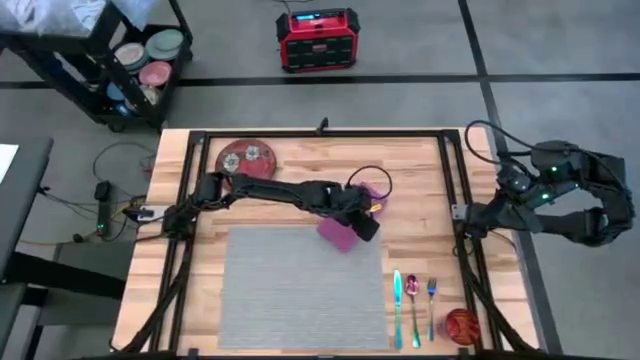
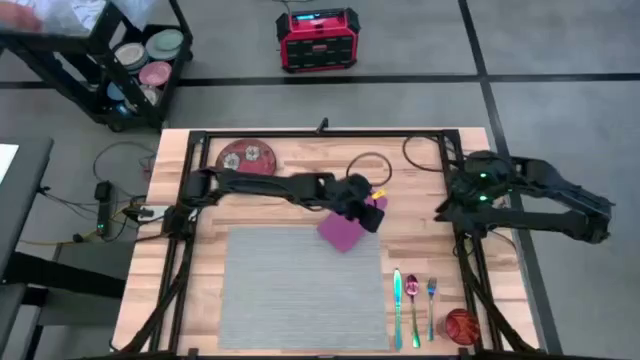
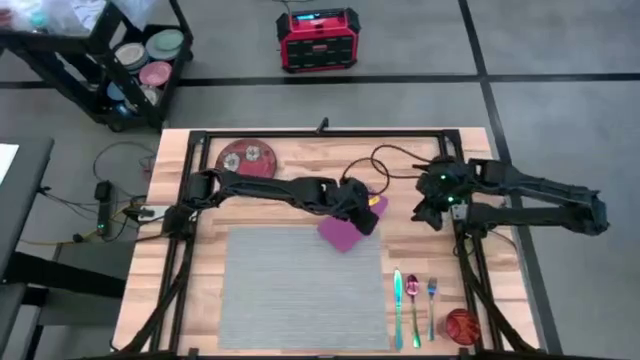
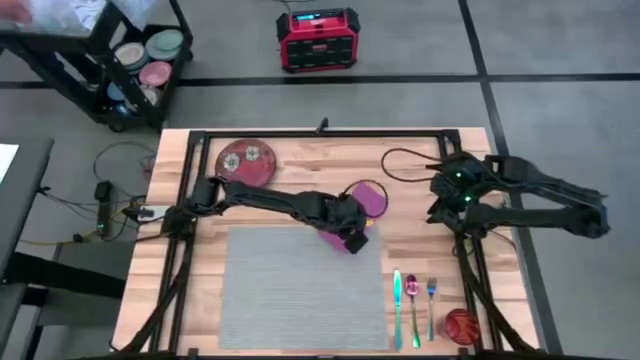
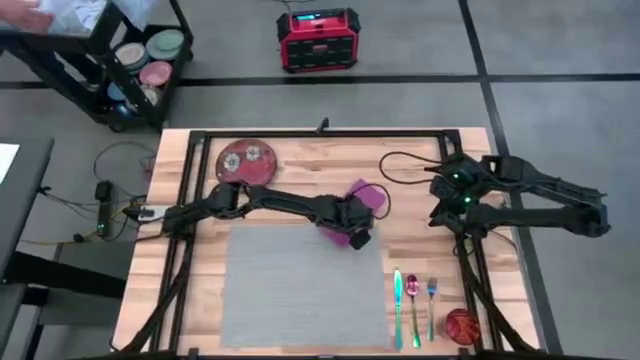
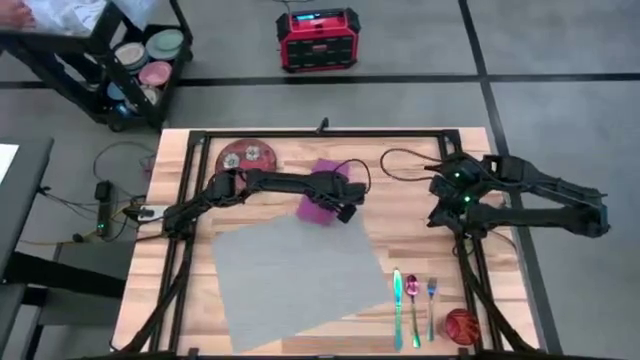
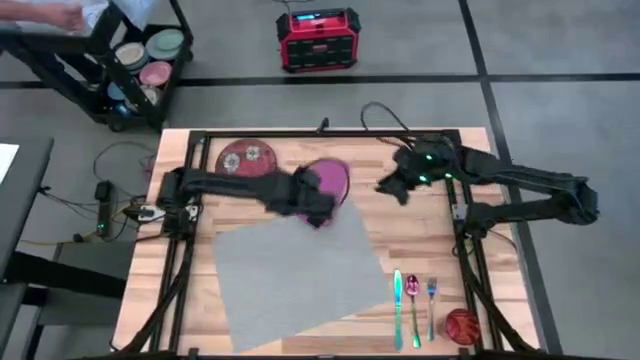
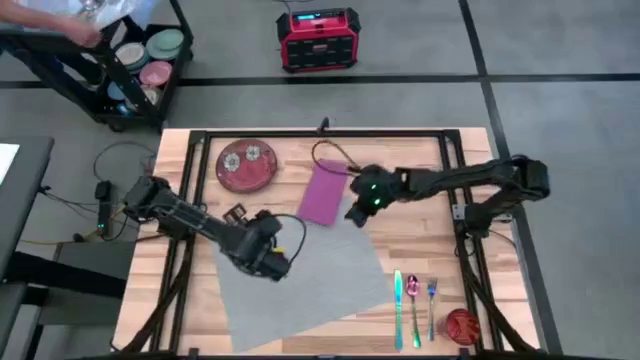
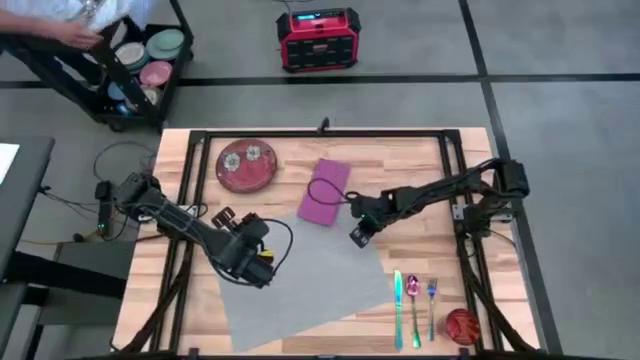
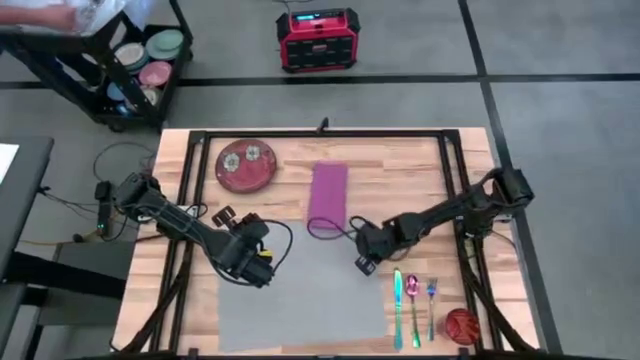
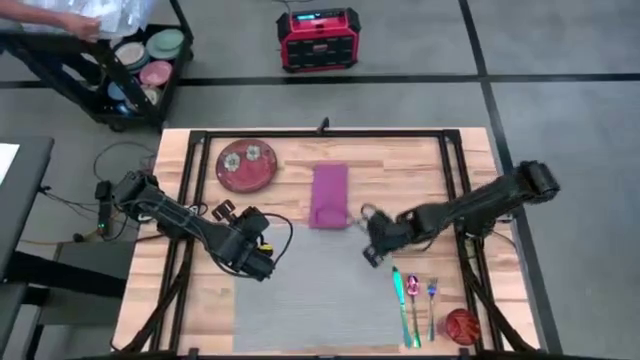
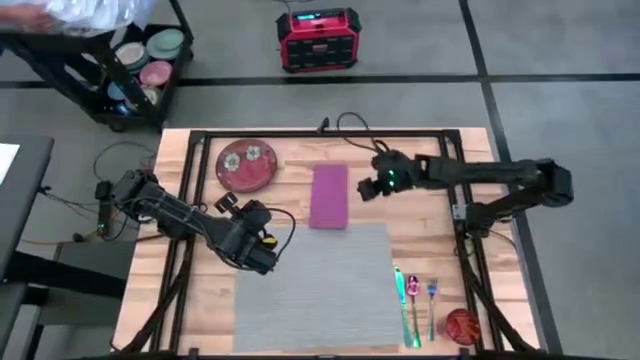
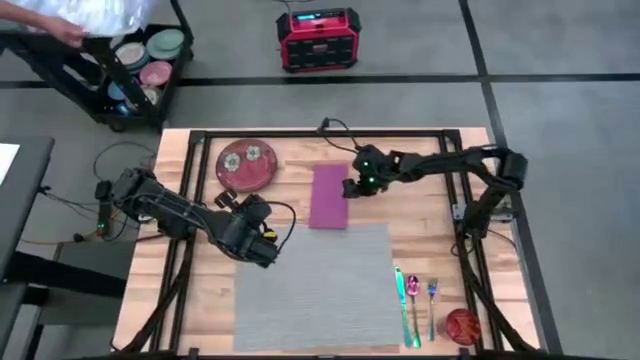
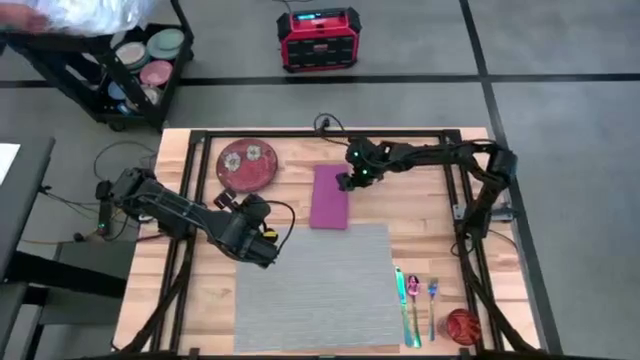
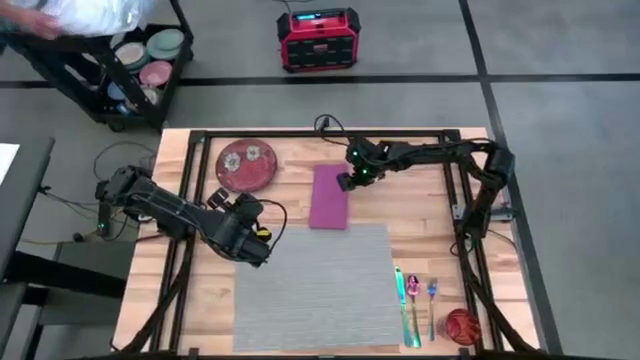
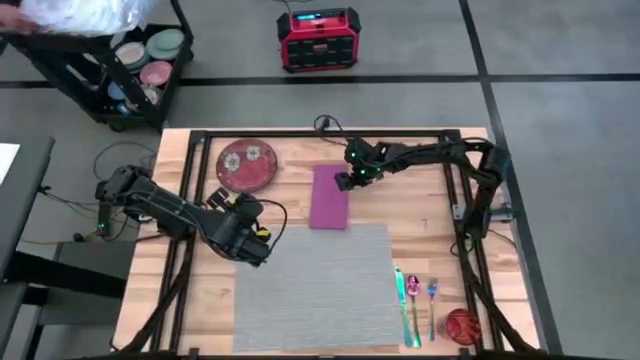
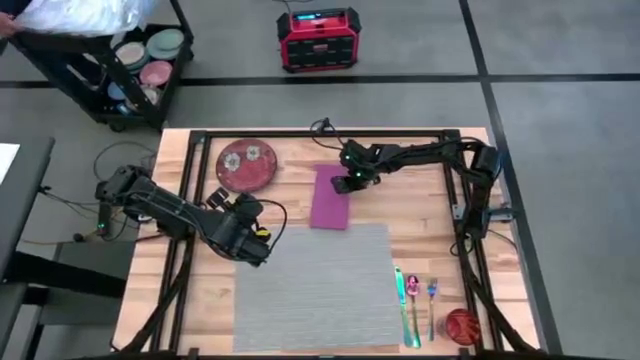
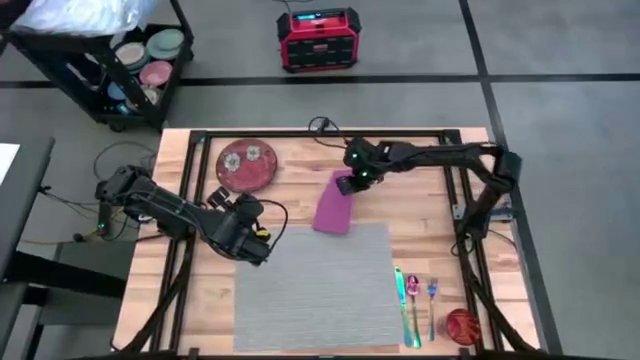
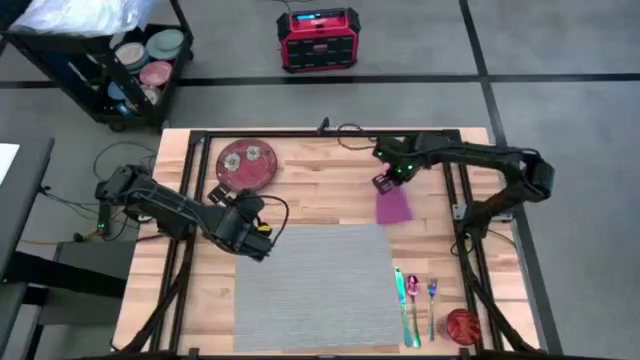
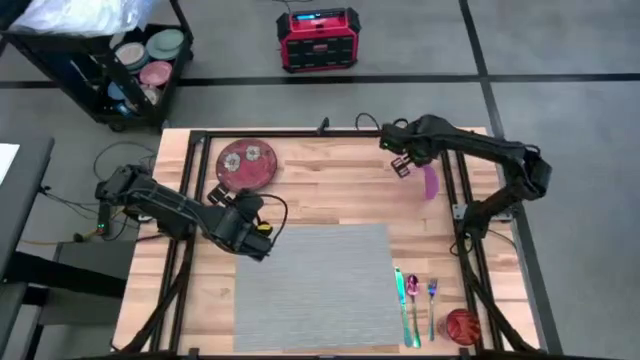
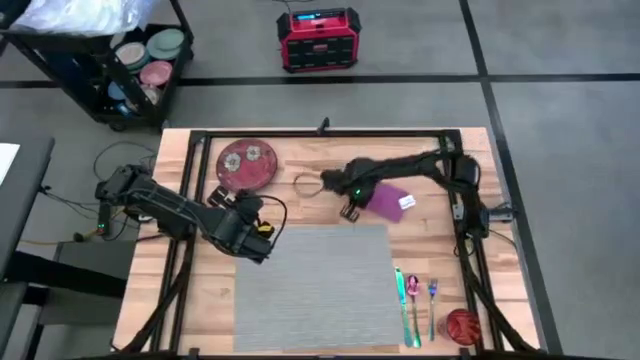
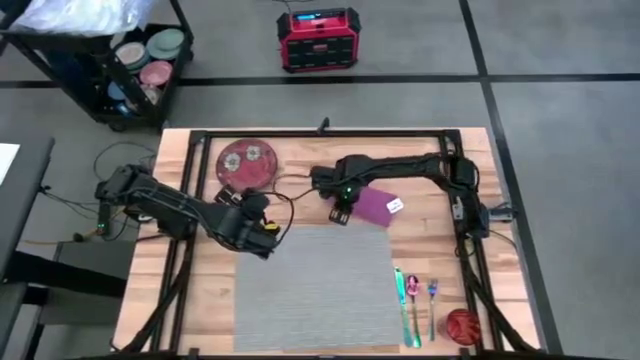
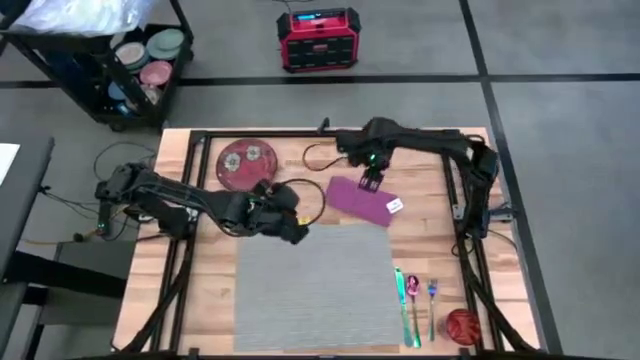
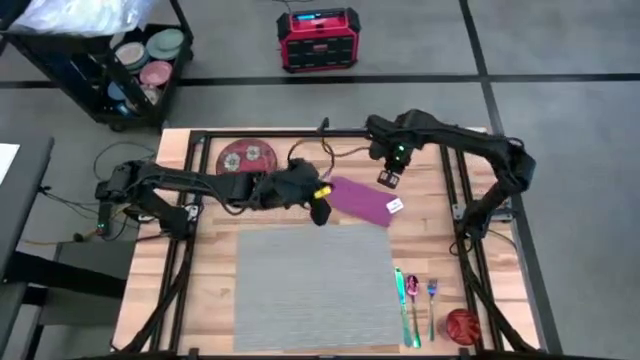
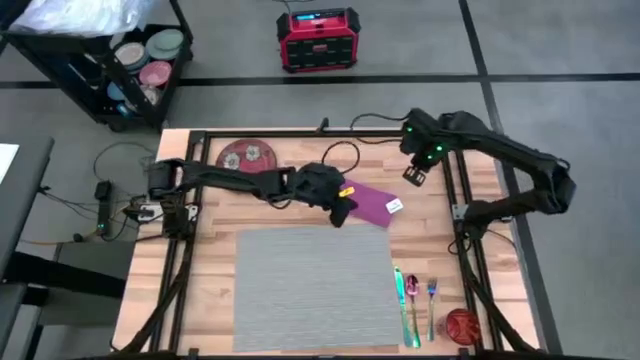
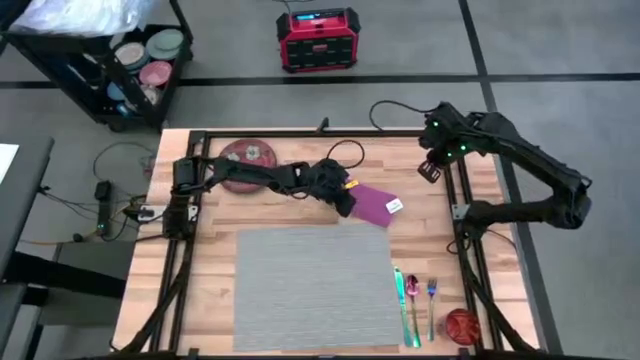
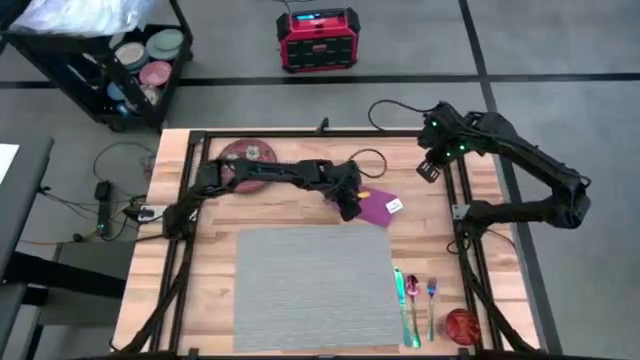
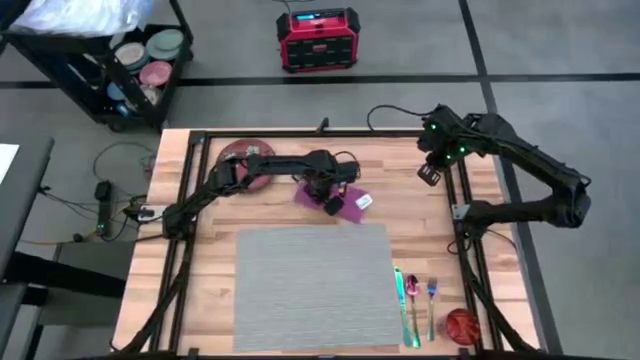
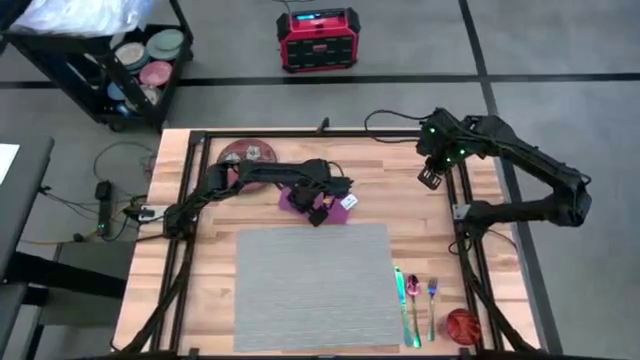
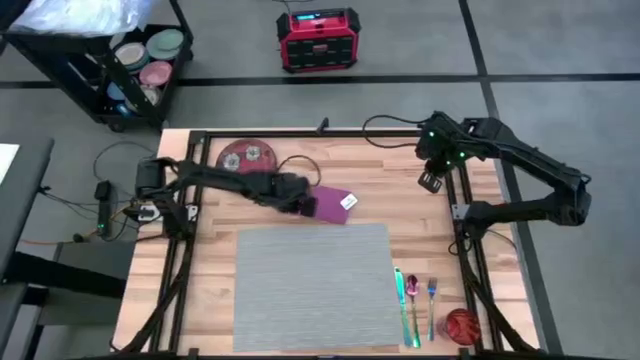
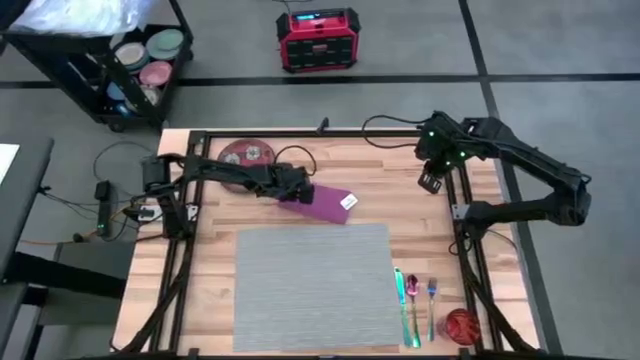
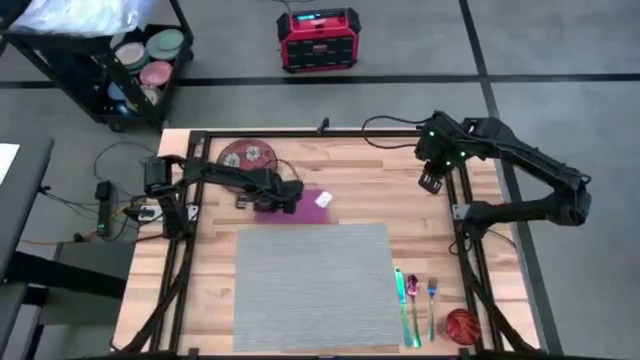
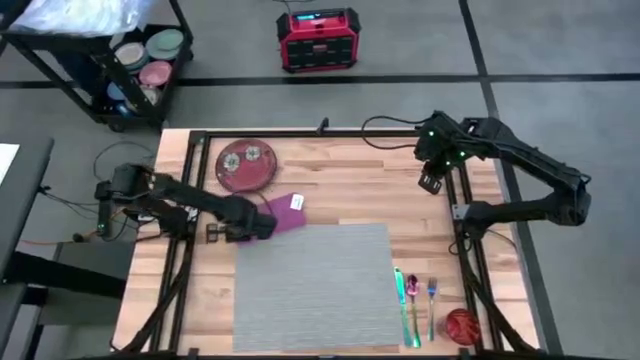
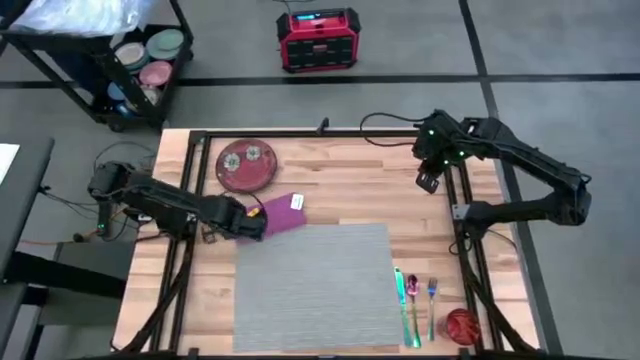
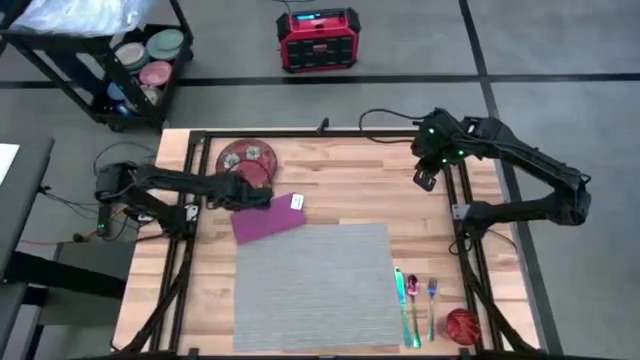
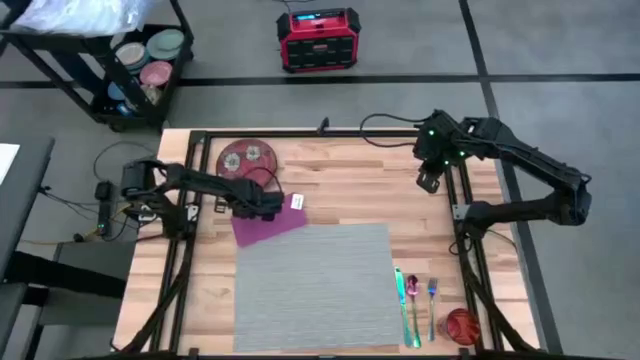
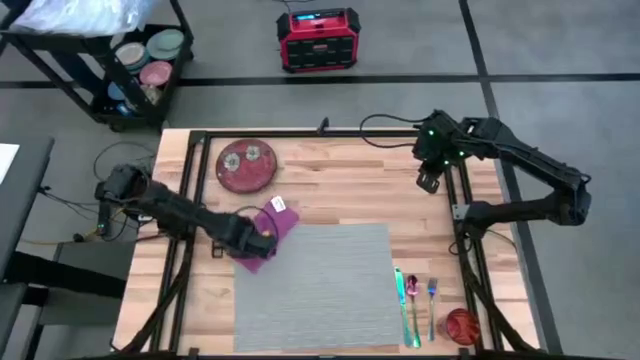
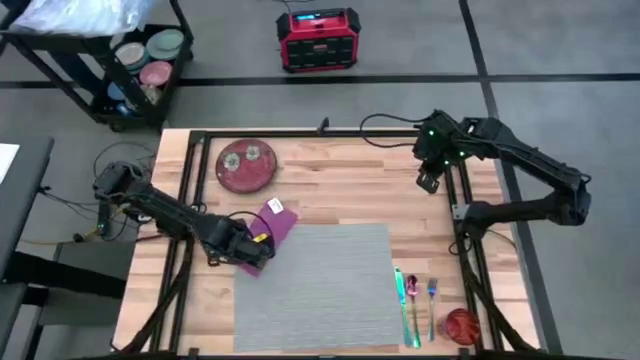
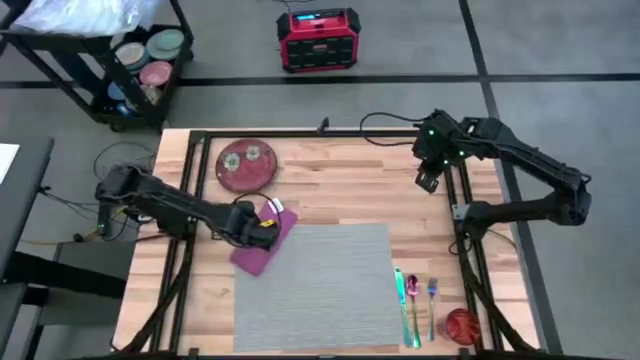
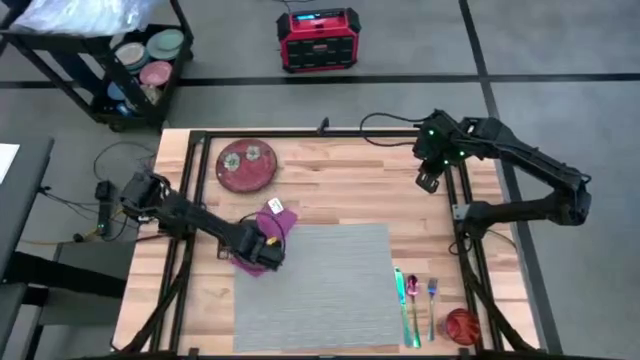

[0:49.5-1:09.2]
Task: Set table place
Put the pink table napkin on the gray table mat

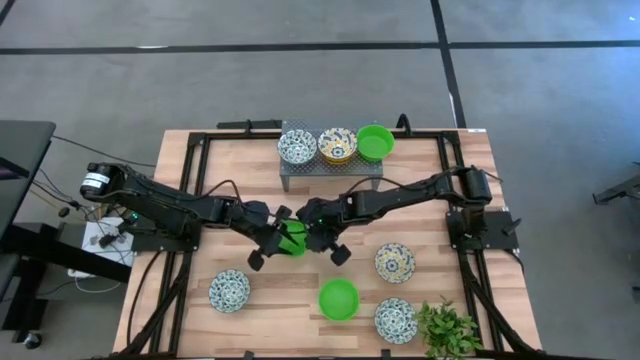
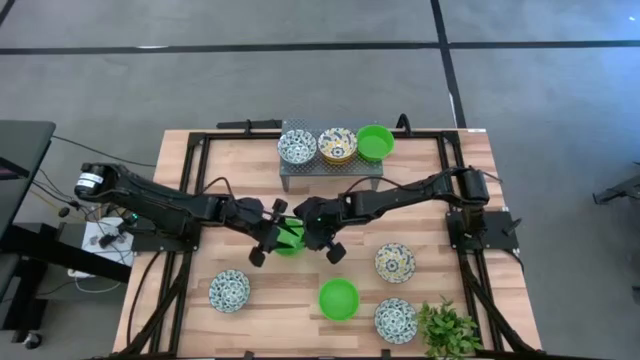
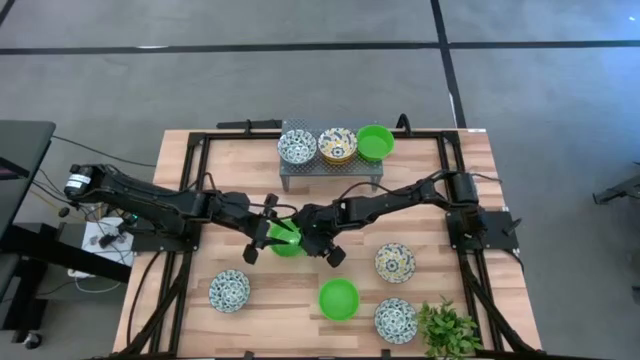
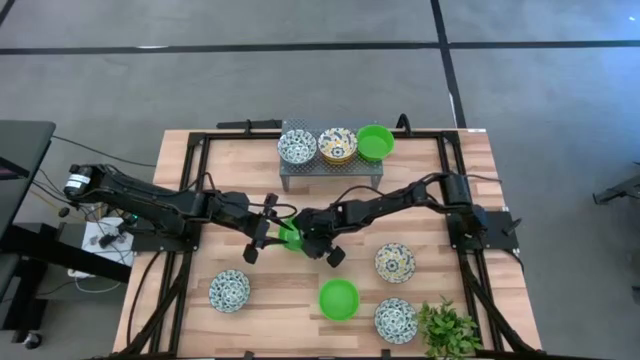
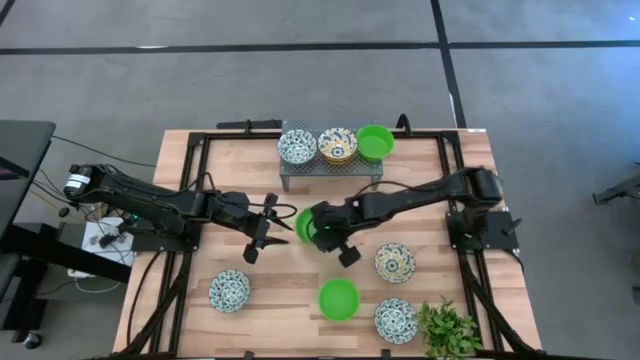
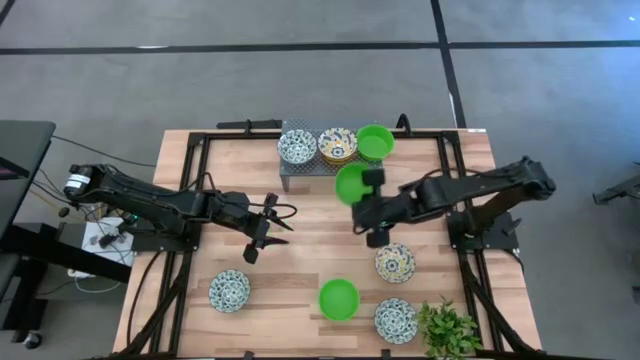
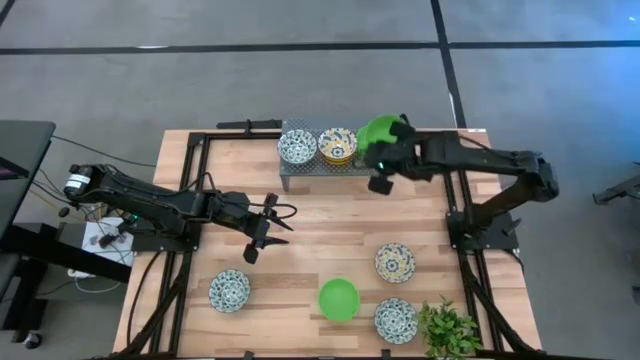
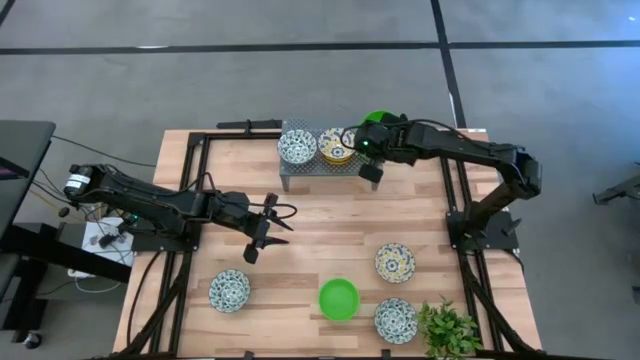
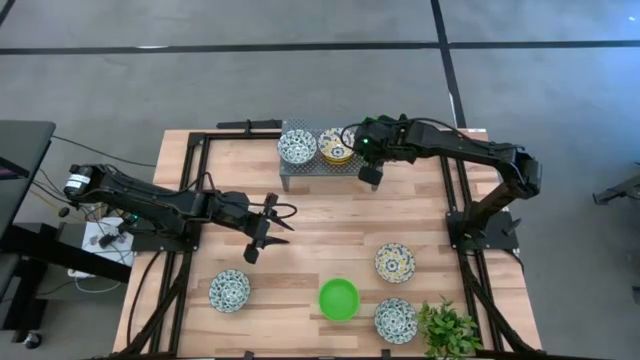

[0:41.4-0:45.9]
Task: Pick & Place Mini bowls
Stack the top green bowl on the green bowl on the shelf
